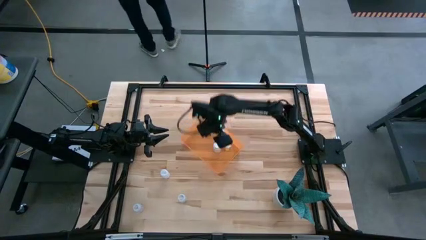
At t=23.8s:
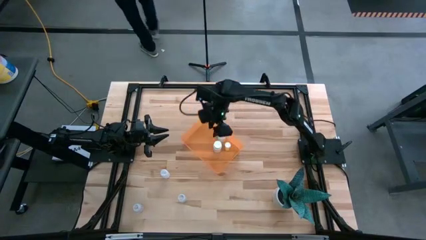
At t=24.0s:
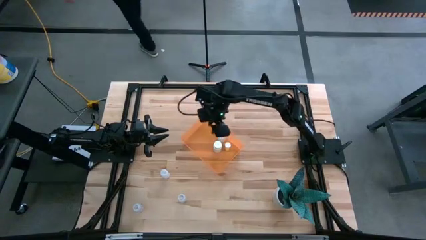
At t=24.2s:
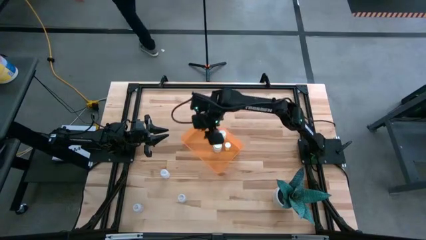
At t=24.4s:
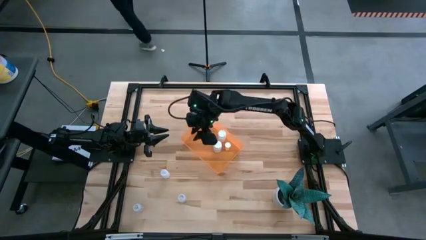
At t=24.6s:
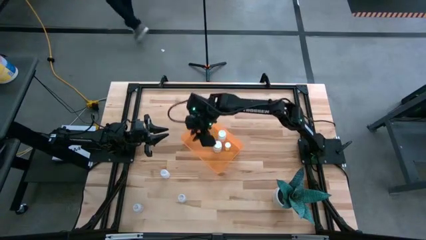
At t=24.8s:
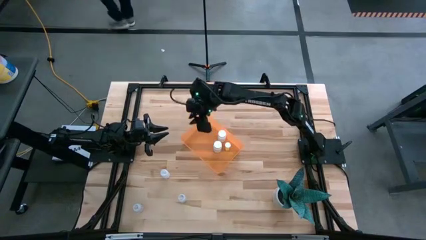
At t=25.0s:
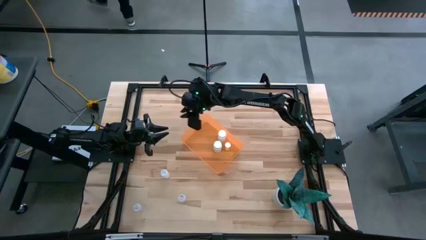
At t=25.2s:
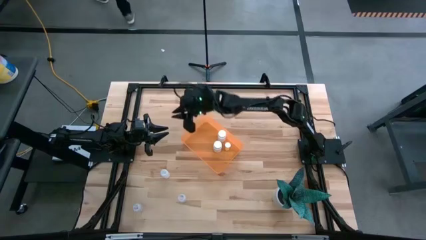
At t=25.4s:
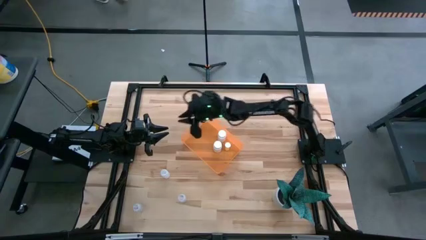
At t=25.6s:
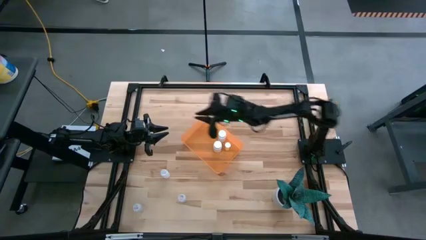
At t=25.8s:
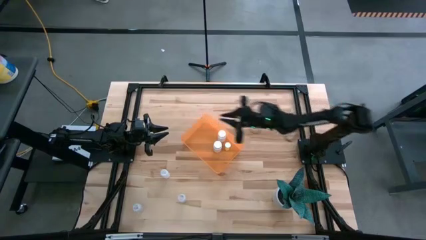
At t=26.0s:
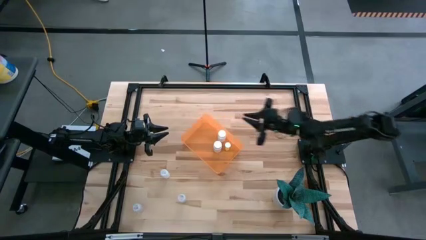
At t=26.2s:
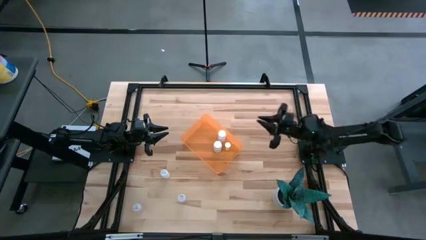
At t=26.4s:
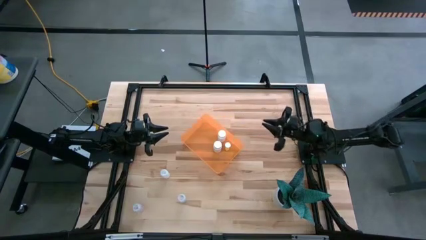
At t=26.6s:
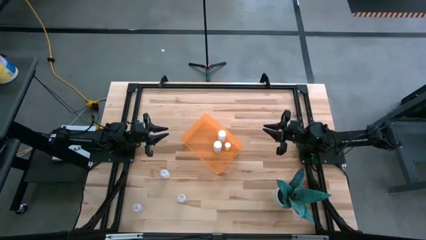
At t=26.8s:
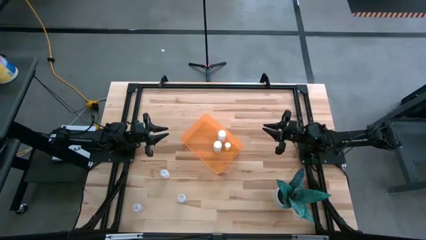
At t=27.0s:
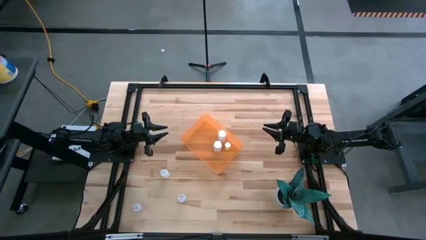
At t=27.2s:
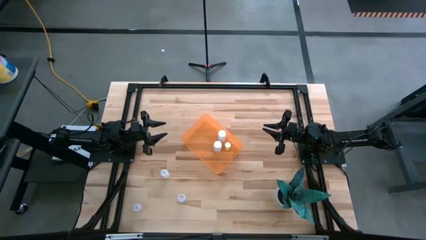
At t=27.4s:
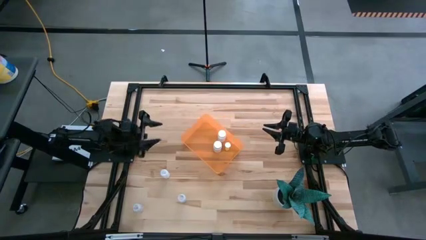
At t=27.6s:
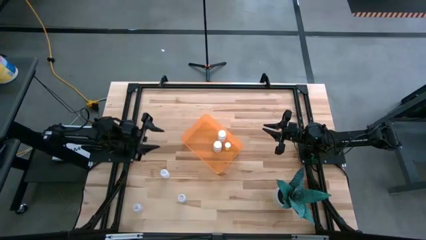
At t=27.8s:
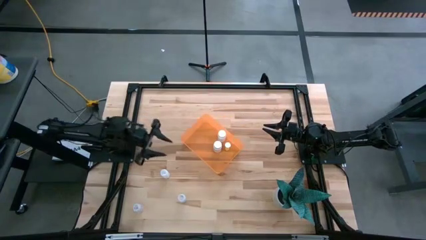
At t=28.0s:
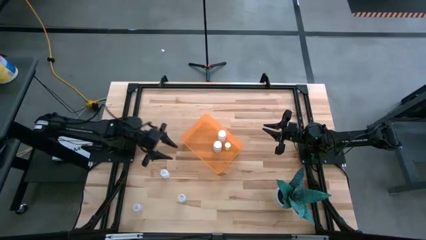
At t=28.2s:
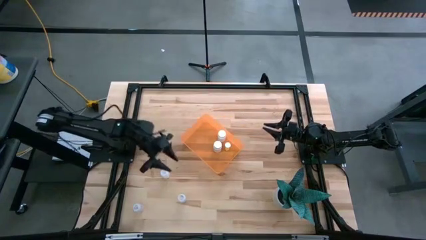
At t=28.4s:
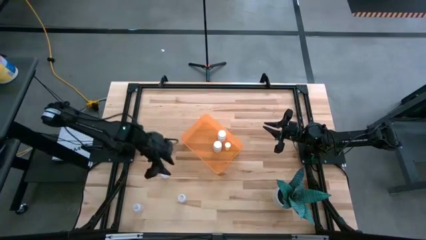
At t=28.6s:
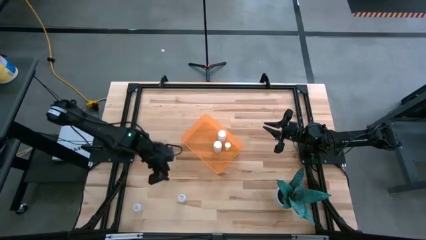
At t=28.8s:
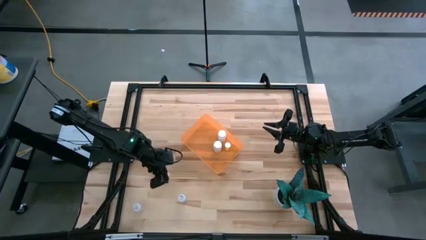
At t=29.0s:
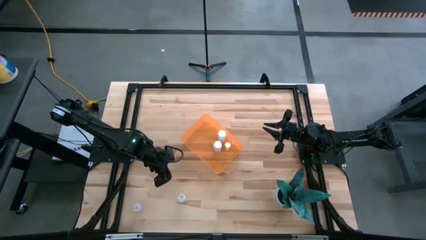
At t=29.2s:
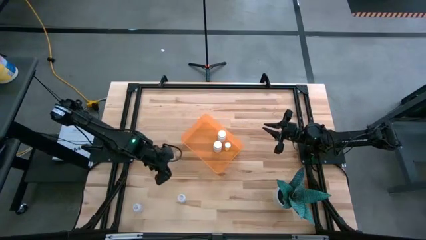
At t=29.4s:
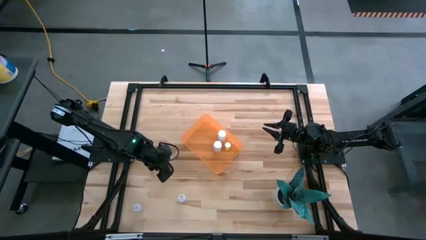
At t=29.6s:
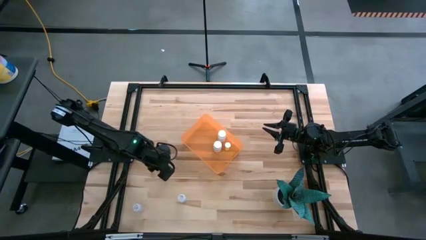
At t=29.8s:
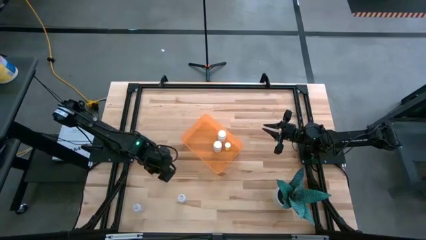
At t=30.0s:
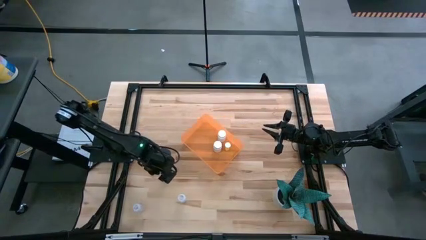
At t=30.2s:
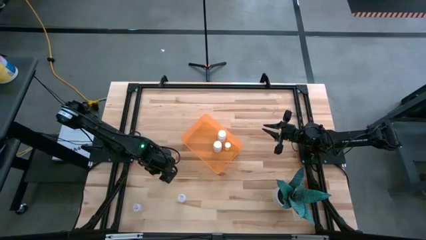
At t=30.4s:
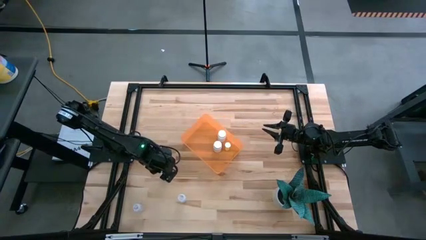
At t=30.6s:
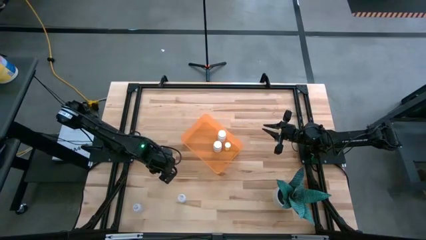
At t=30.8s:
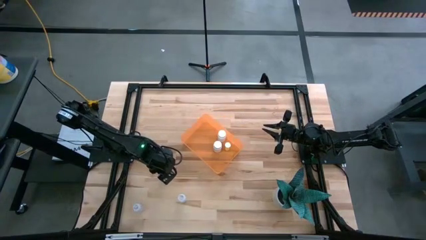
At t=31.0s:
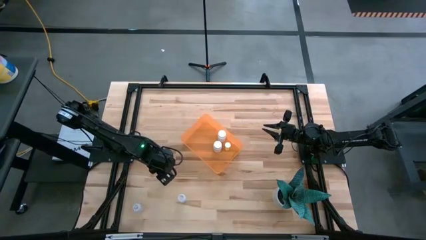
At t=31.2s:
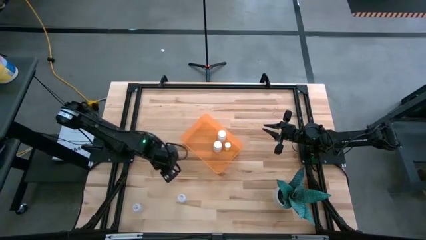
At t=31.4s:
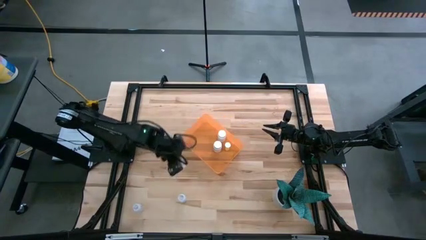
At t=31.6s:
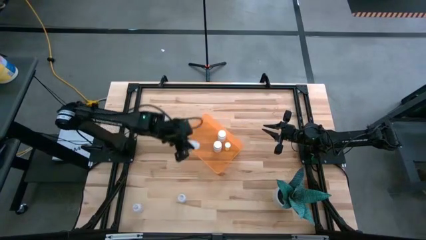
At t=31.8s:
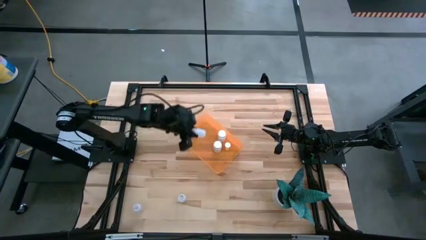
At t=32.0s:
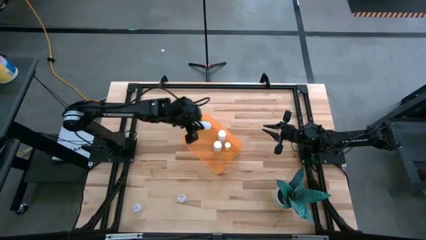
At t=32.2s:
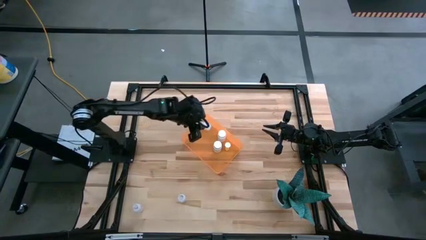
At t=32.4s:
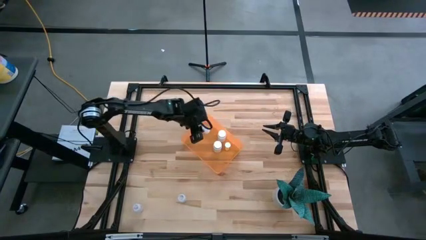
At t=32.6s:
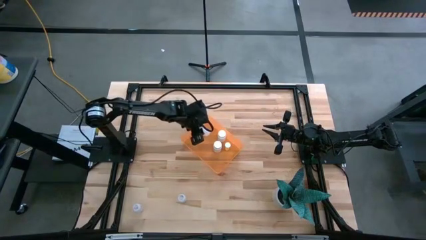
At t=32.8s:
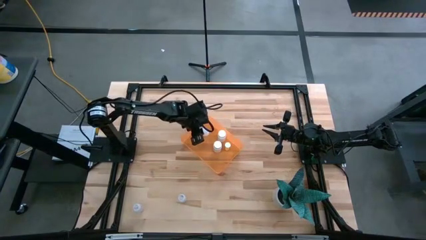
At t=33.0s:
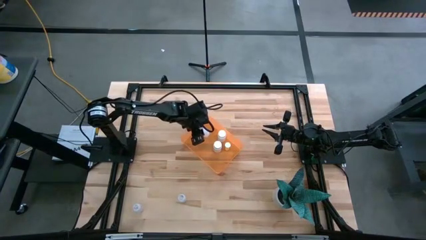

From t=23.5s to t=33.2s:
Task: Pick and place pill bottles into a basket
Put the white pill bottle into the orange bin

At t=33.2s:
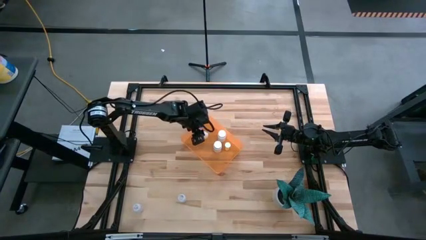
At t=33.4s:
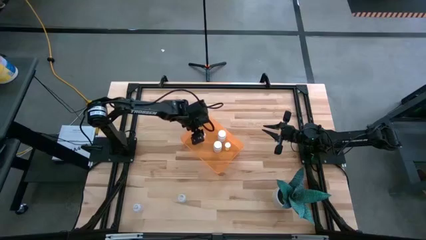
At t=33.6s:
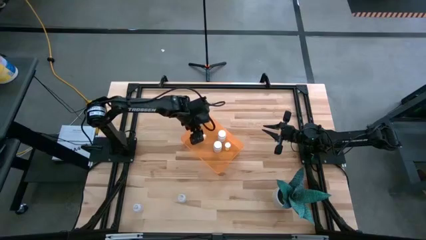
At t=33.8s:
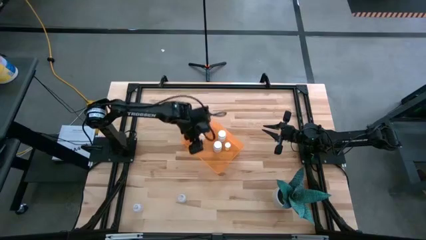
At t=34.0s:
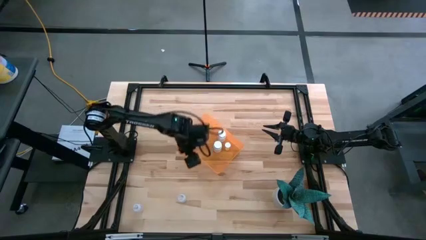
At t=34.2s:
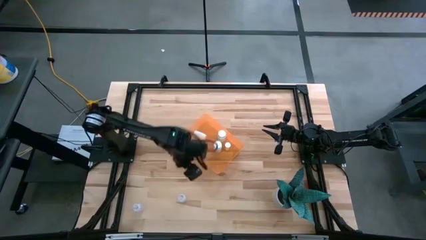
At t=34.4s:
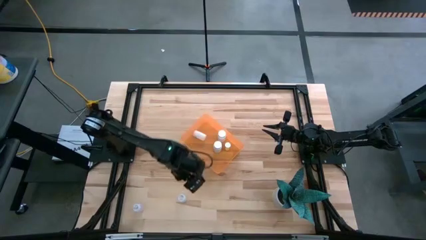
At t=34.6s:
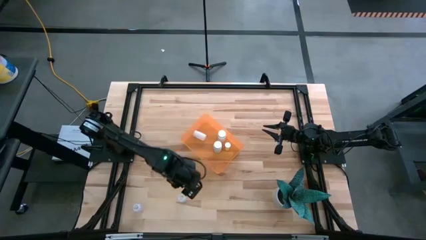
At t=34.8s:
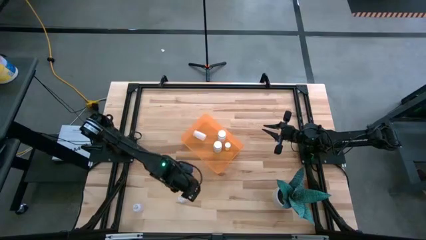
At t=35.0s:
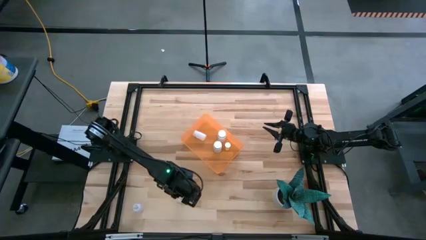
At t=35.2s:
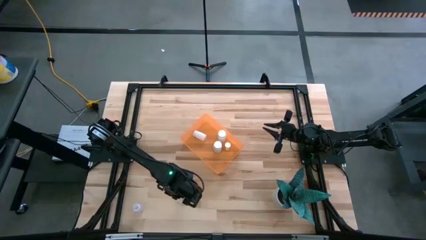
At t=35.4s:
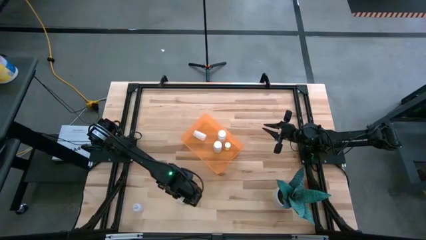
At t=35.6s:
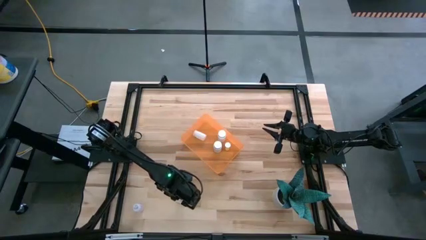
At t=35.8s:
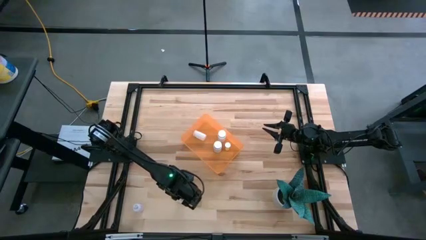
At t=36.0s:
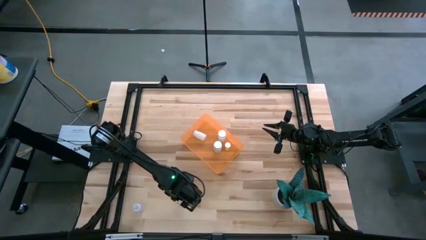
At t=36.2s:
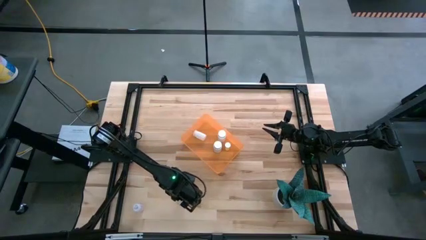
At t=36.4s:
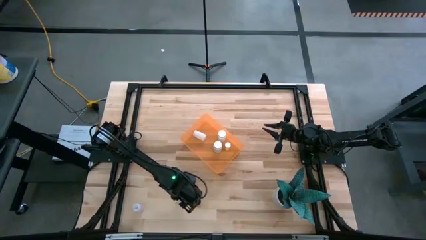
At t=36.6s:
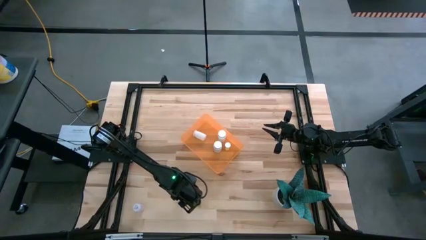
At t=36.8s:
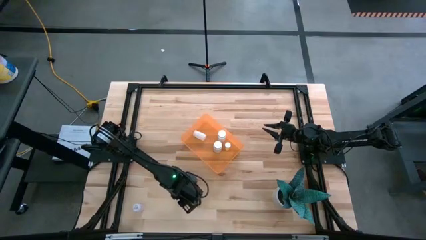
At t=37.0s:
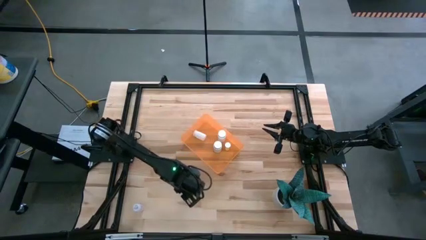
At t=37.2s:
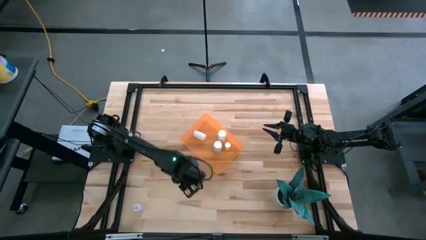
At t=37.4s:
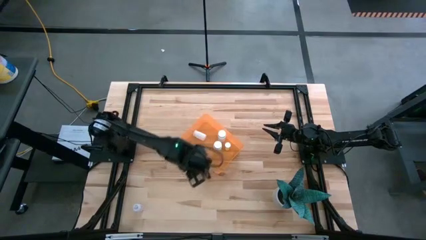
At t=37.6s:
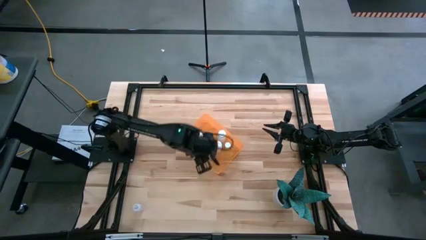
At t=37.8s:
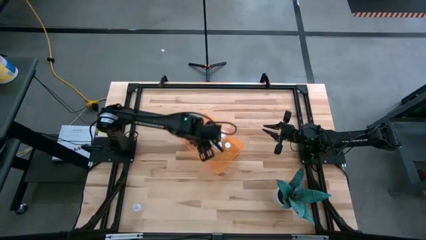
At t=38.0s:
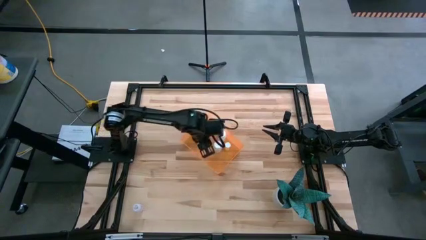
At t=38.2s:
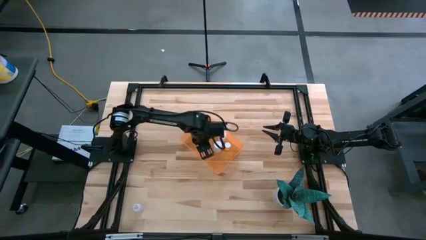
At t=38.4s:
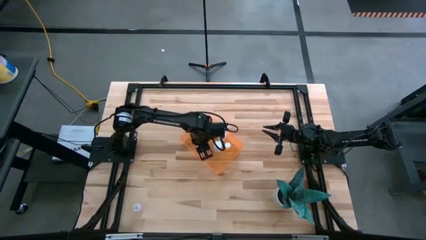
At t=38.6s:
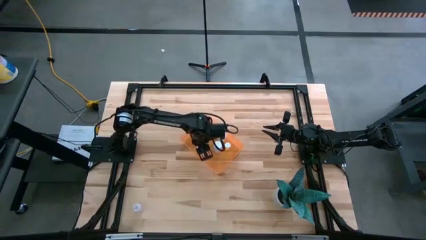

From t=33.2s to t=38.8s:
Put the top transparent pill bottle into the orange bin

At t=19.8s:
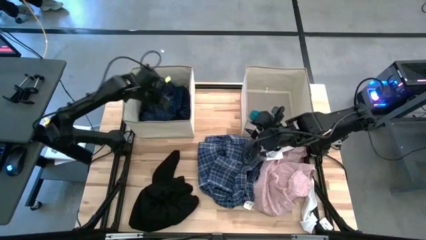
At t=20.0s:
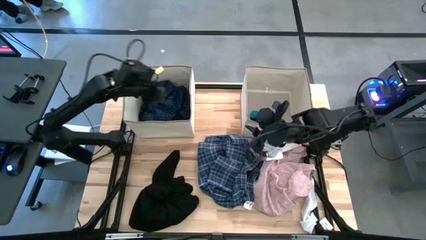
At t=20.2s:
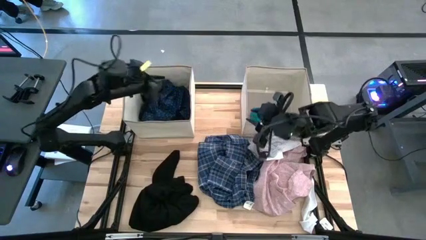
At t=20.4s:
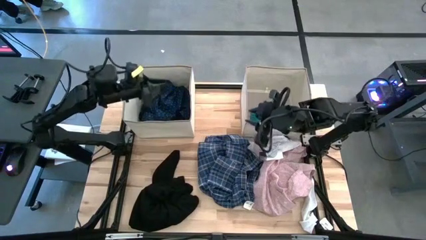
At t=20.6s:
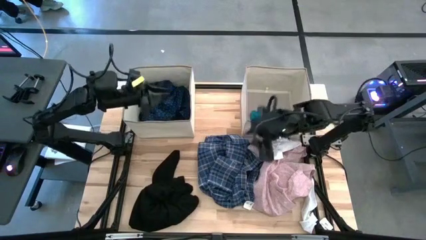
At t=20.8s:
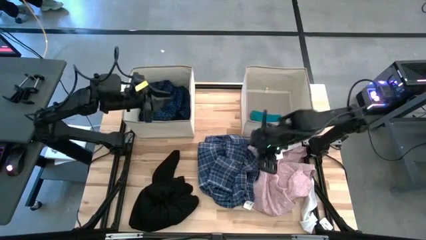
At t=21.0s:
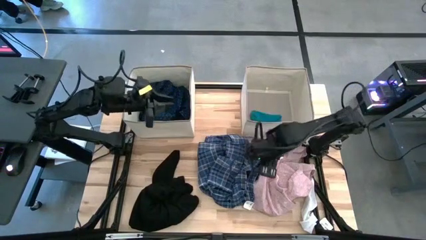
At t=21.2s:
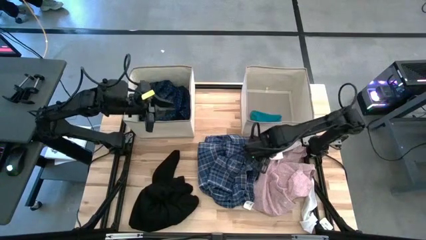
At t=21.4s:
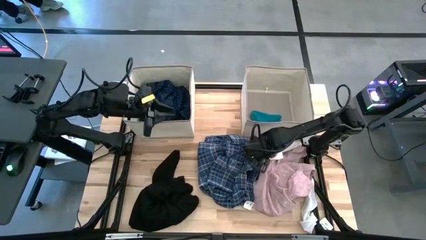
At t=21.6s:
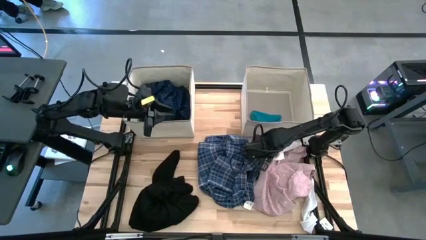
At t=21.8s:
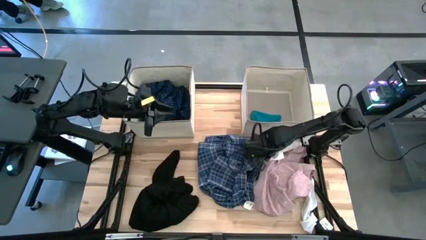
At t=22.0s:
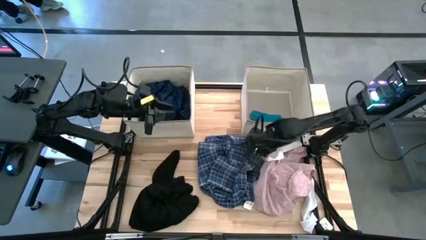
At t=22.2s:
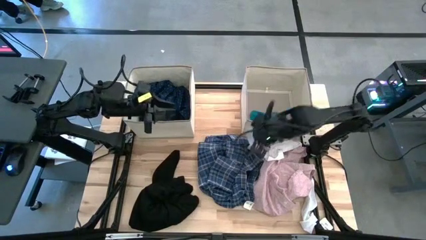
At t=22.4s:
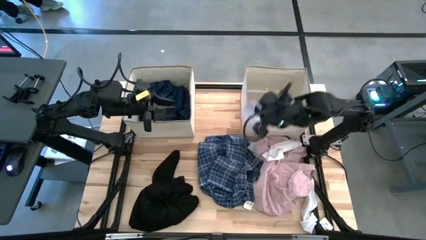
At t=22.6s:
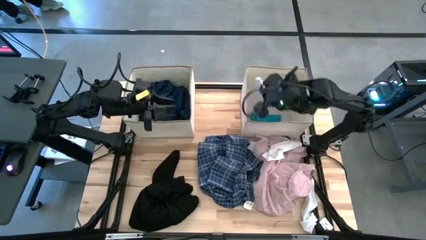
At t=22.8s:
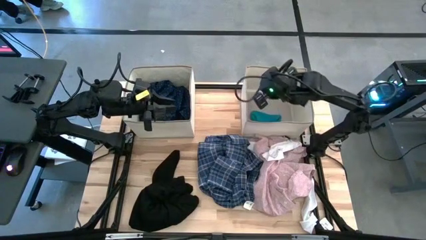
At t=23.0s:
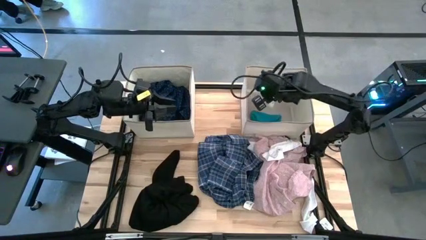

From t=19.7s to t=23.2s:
Task: Sort clothes
Put the white sock into the right laundry bin
